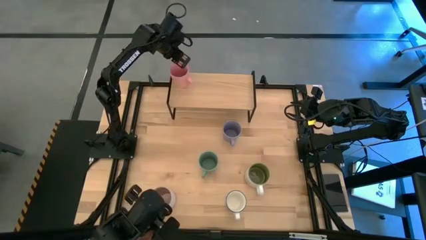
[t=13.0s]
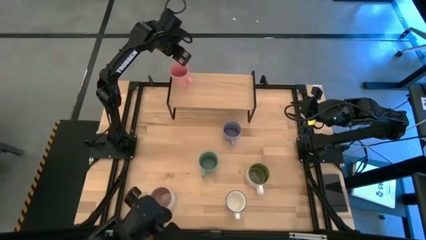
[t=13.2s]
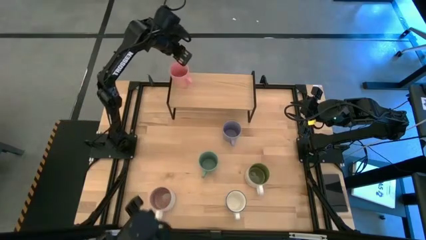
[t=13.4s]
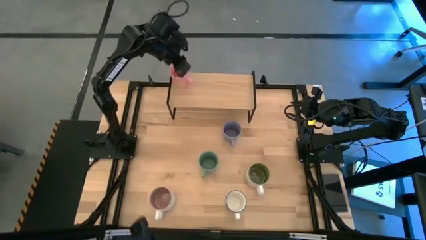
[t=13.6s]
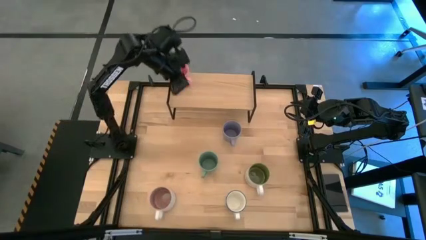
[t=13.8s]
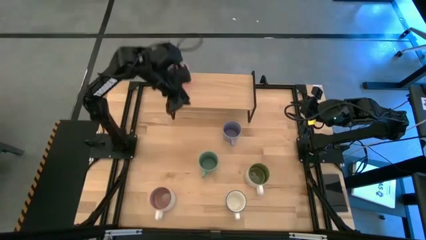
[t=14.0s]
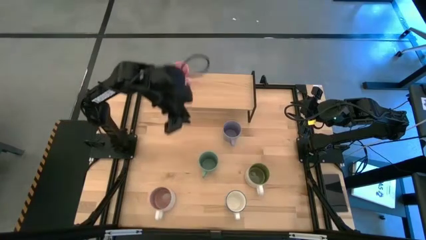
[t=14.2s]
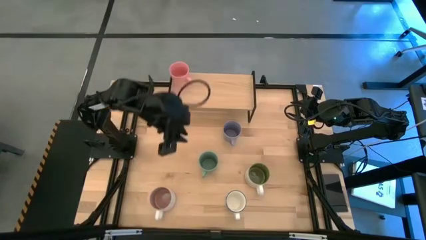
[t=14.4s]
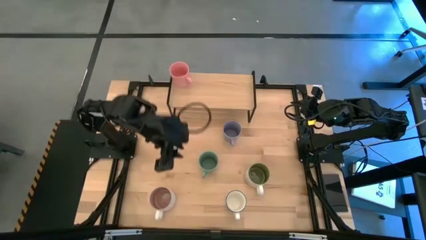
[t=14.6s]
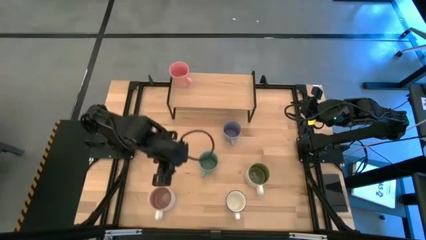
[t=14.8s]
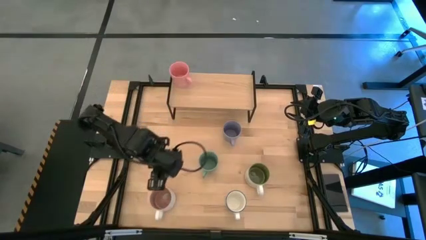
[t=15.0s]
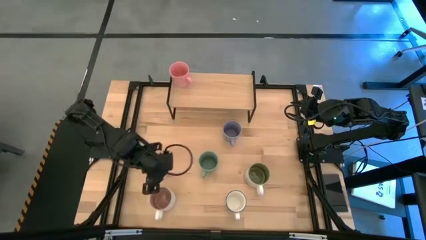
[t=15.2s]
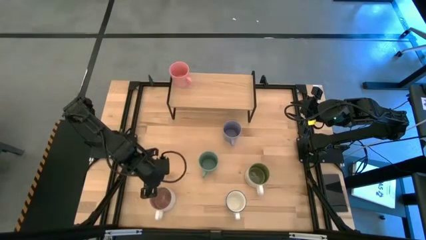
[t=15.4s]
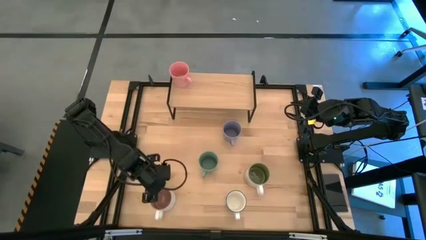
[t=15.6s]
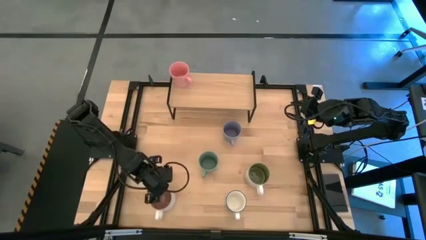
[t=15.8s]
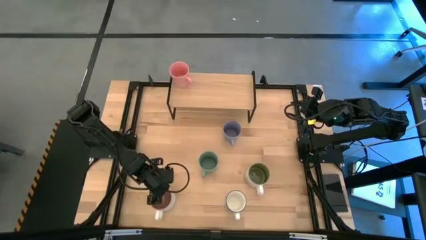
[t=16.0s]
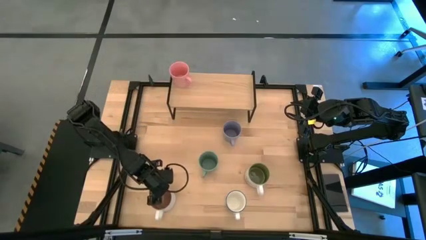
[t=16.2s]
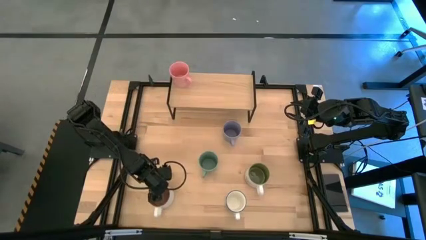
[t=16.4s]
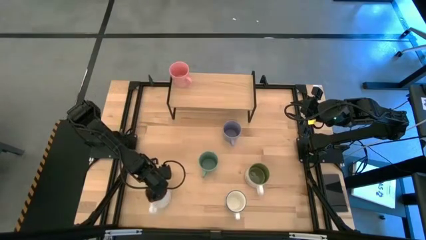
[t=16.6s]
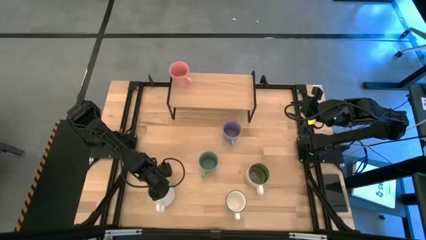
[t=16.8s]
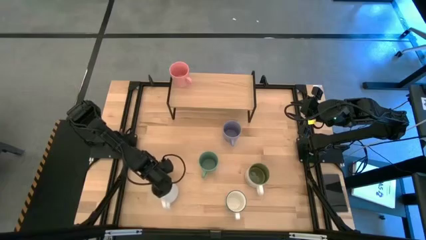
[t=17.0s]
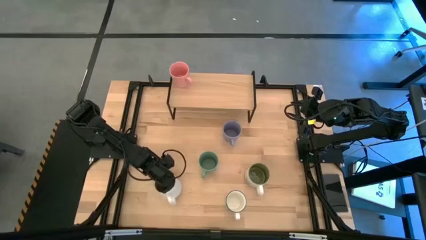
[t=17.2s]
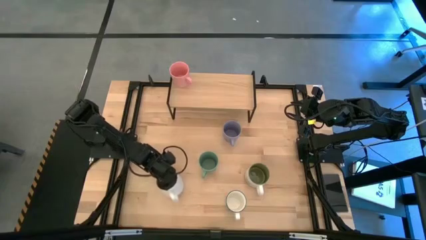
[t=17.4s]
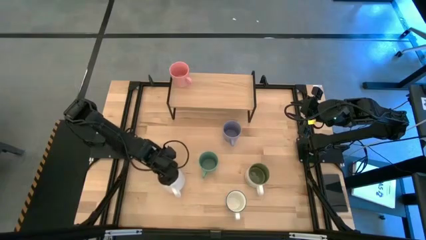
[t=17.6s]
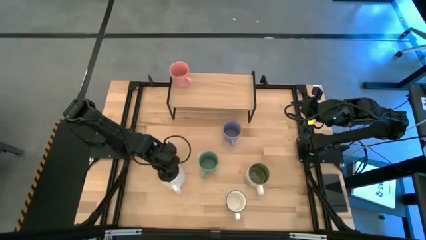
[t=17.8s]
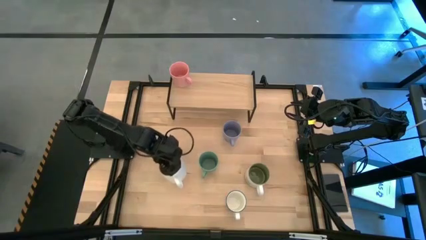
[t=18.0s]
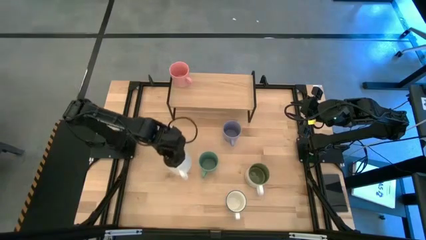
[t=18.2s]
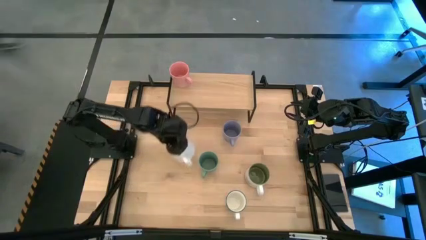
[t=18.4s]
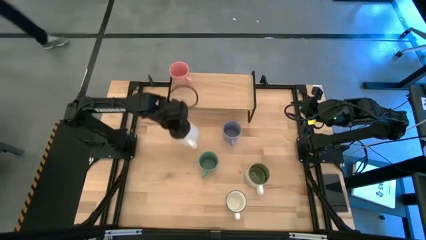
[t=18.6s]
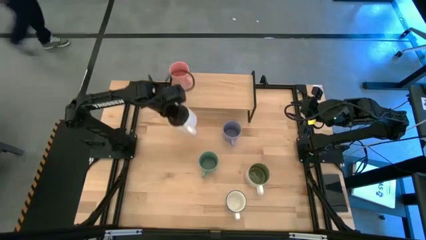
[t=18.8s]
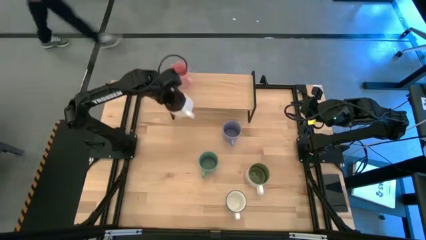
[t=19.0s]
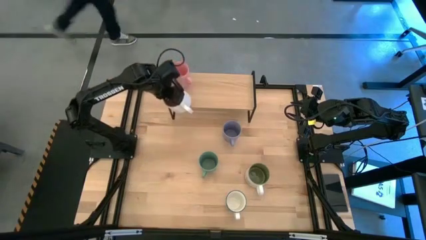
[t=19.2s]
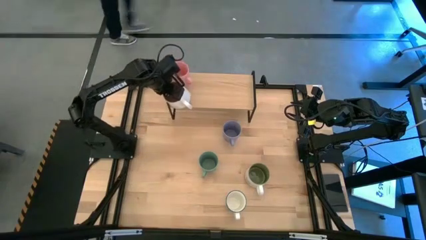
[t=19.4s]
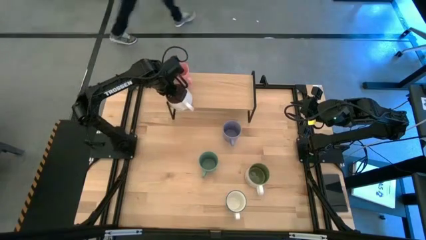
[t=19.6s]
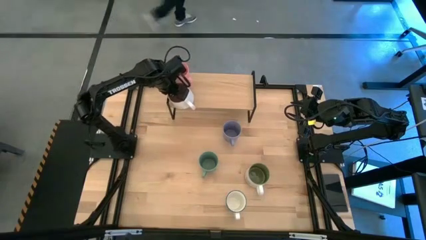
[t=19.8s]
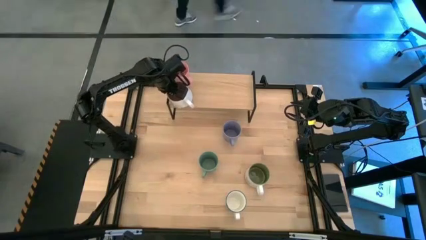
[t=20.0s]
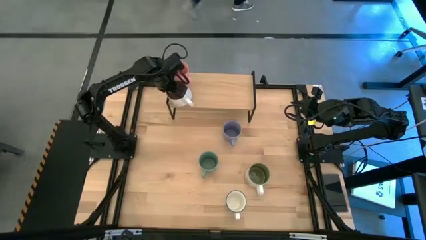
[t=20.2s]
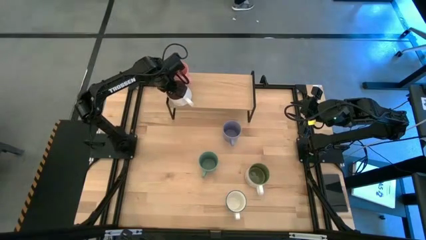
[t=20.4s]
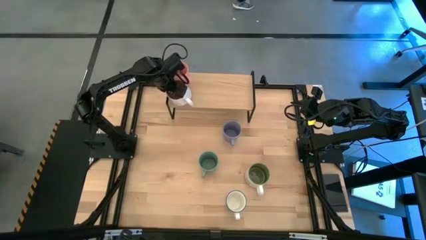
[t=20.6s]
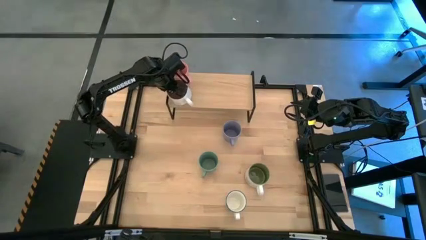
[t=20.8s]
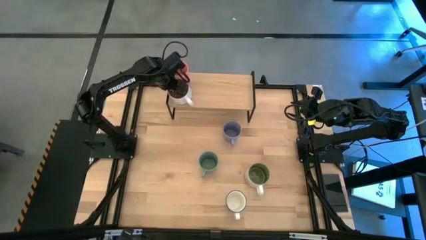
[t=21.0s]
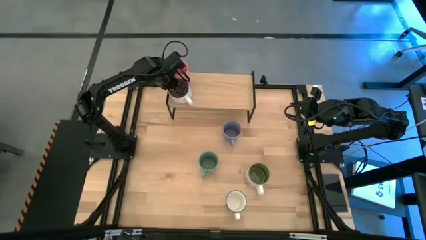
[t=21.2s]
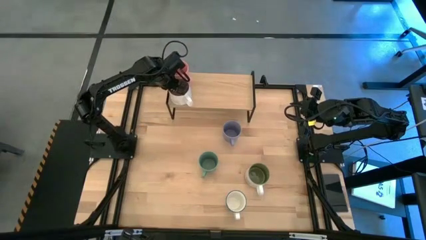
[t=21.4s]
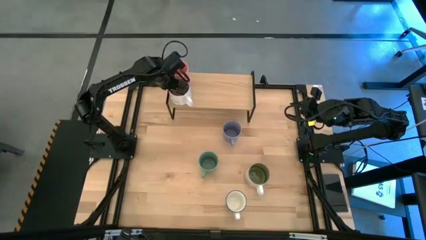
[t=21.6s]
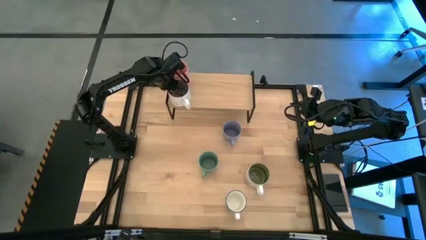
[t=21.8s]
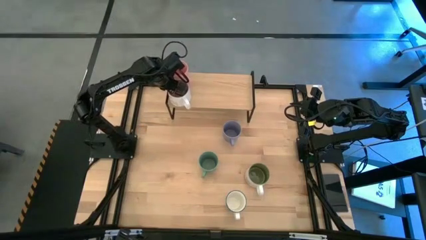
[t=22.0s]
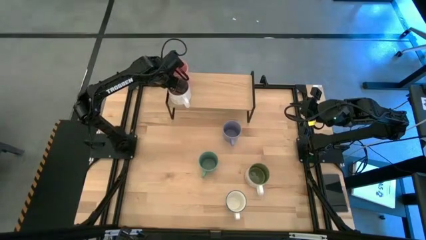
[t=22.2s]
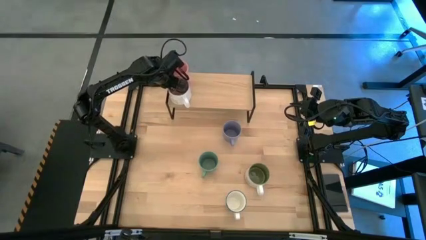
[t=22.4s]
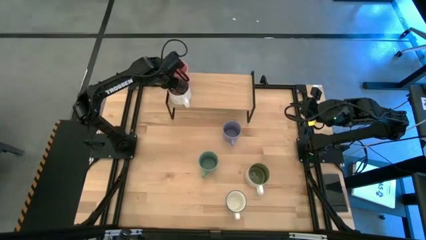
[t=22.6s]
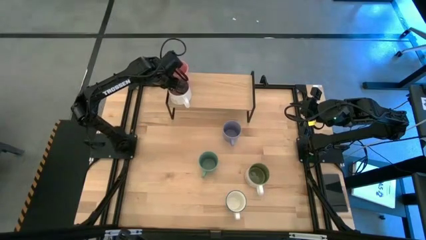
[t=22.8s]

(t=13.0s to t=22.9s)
Task: Place coffee mugs
Put the white-brown mug on the shelf
